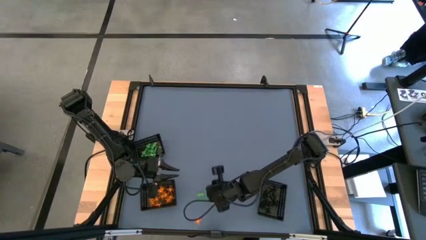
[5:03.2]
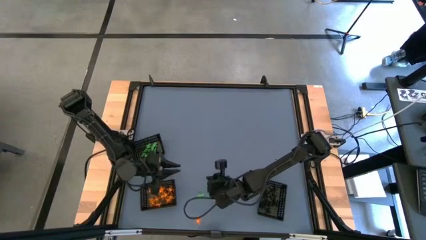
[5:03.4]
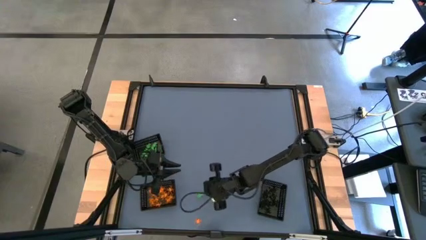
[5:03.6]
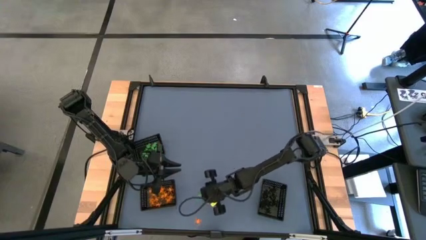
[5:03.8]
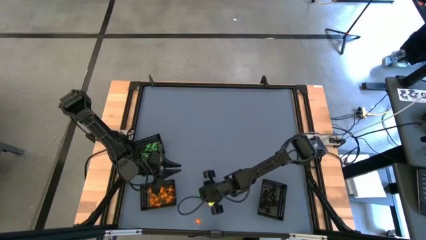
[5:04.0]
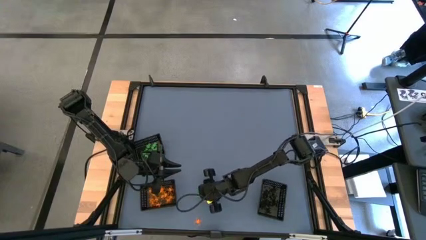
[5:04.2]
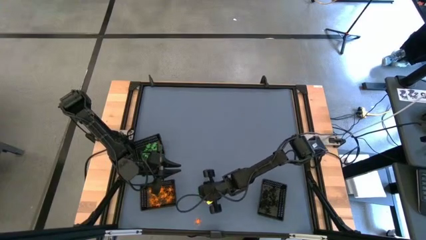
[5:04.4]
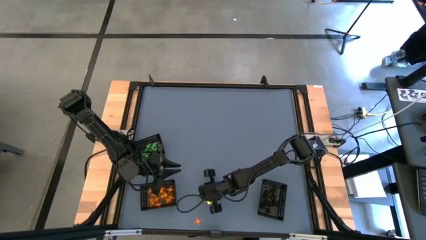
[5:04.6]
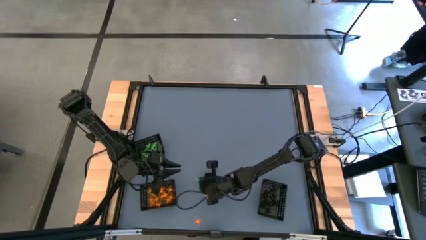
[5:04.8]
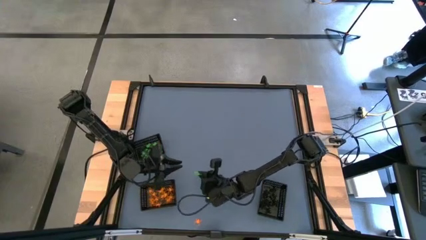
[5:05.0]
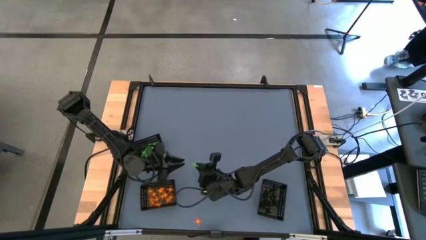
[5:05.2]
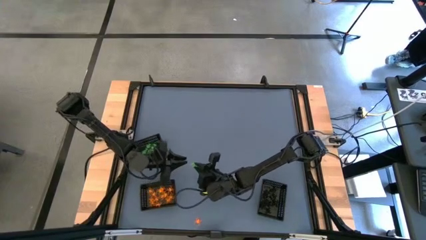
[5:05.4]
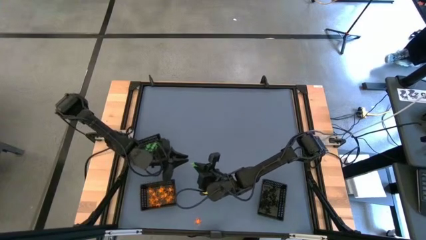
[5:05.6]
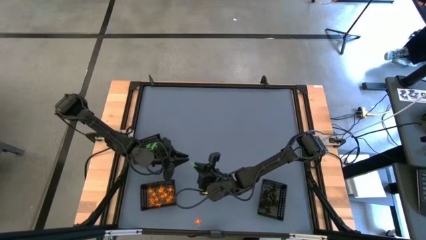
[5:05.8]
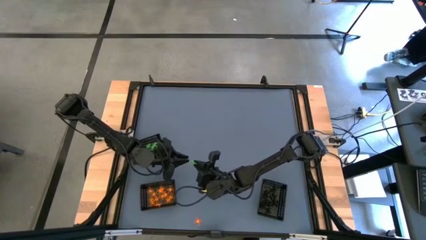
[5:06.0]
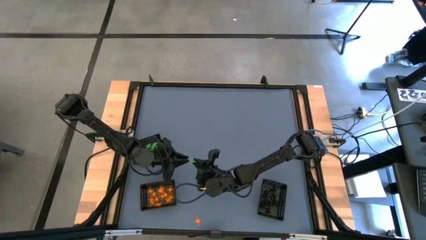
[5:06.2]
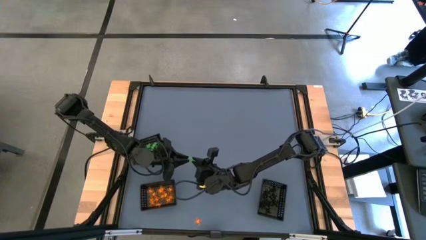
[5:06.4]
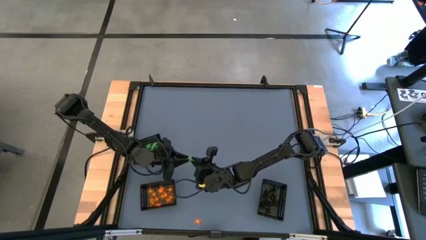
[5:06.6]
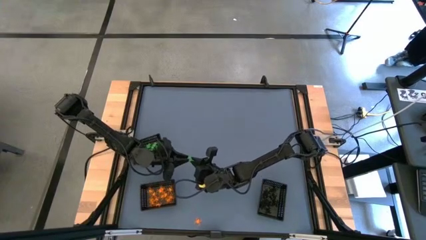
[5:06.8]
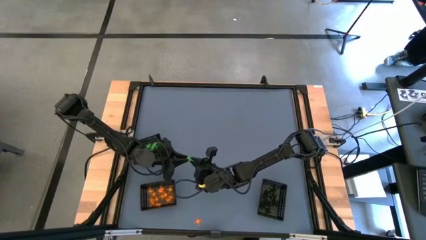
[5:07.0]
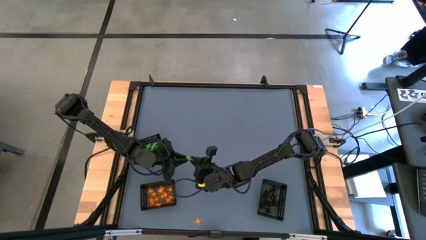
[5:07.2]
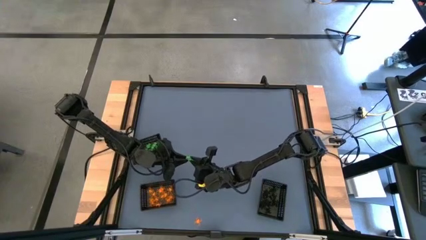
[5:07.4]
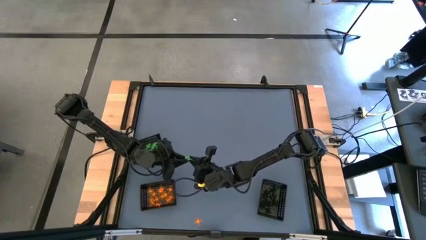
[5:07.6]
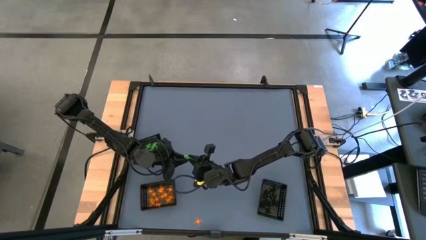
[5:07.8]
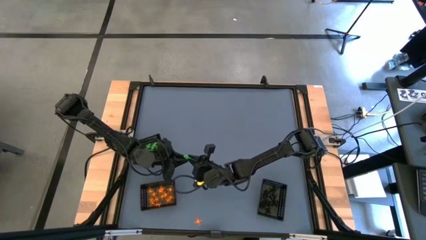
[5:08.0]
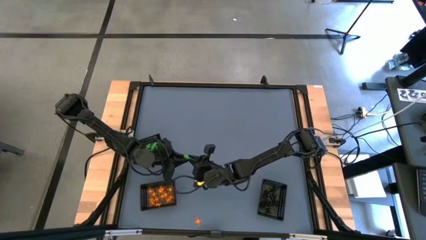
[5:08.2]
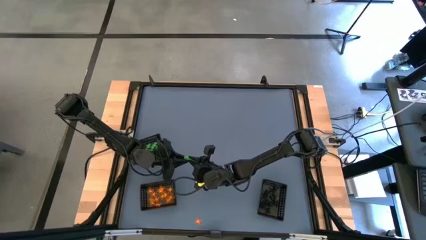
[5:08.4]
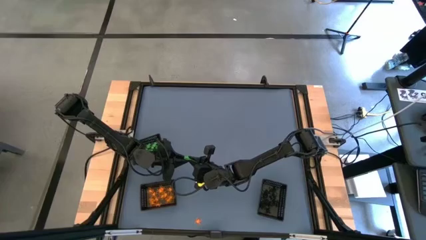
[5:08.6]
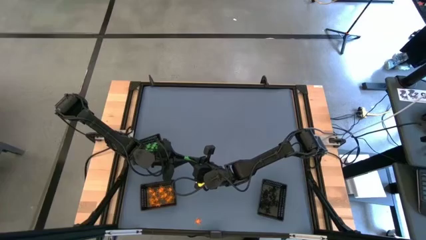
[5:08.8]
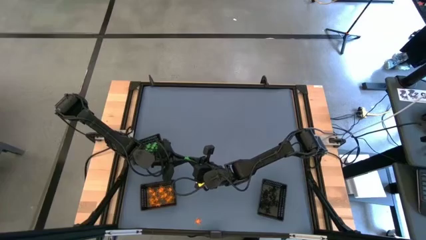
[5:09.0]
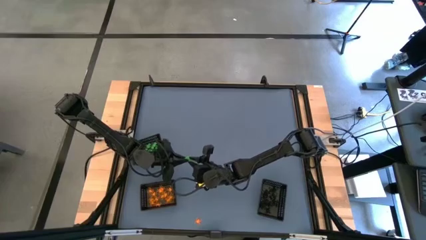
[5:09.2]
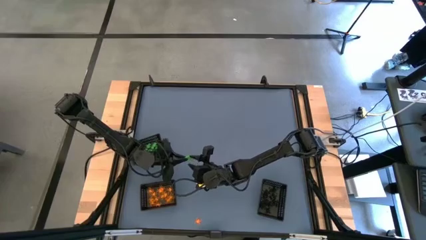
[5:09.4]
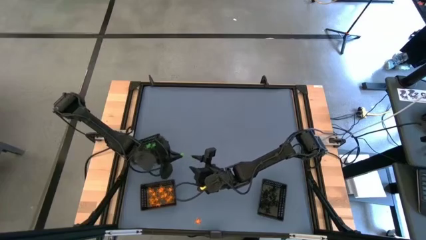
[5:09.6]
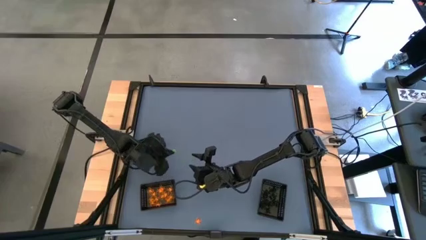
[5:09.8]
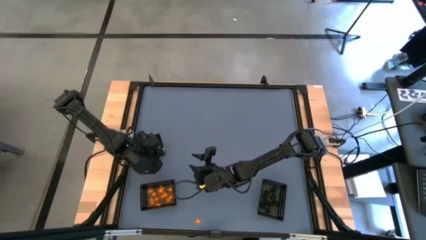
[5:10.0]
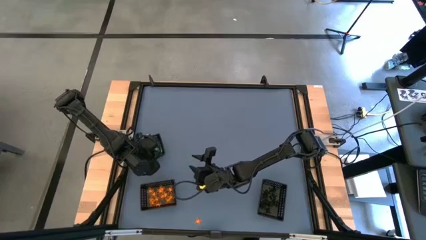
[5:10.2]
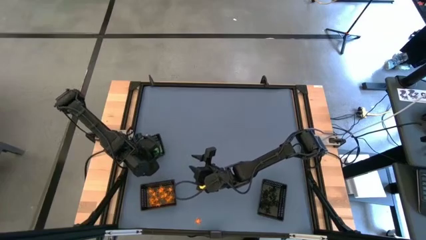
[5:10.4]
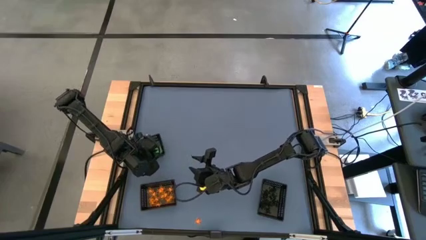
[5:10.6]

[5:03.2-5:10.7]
Task: Sort Halloween decoration
Put the green skeleton toy into the top black bin

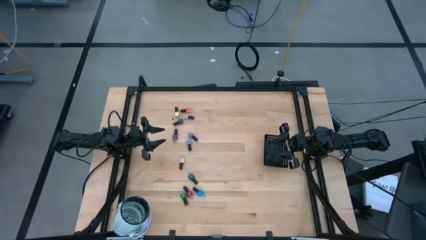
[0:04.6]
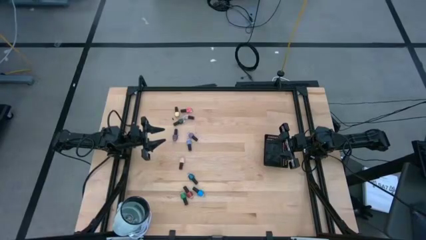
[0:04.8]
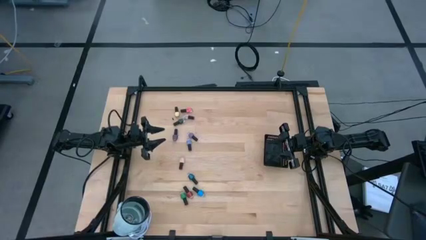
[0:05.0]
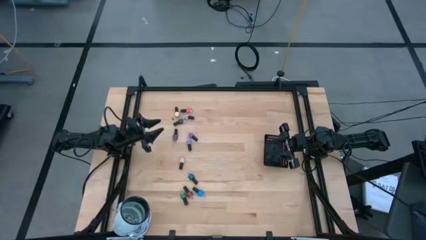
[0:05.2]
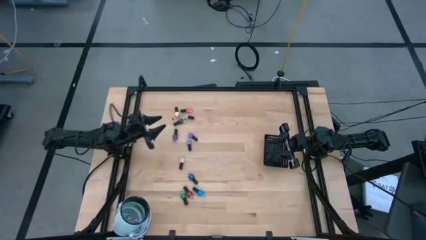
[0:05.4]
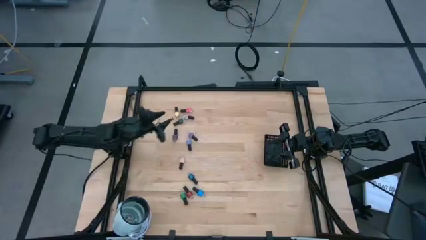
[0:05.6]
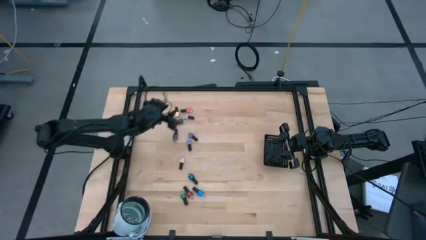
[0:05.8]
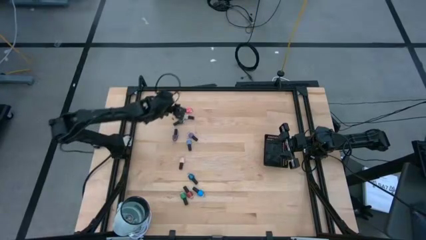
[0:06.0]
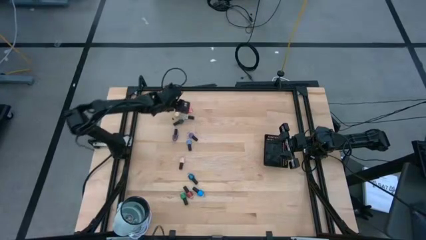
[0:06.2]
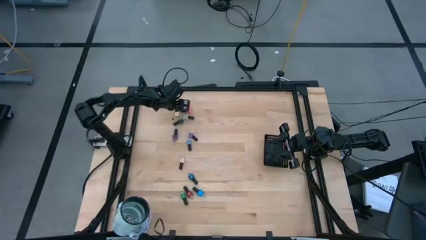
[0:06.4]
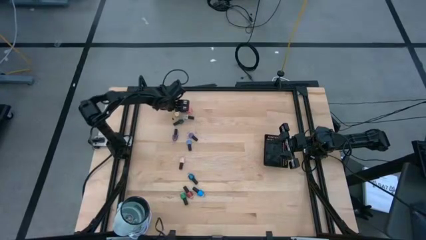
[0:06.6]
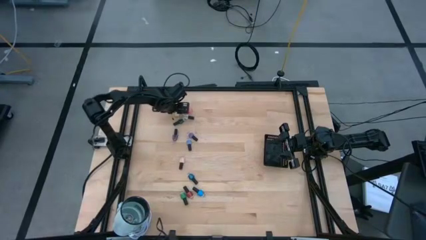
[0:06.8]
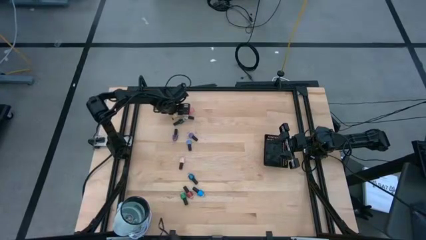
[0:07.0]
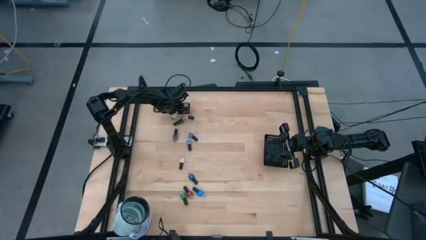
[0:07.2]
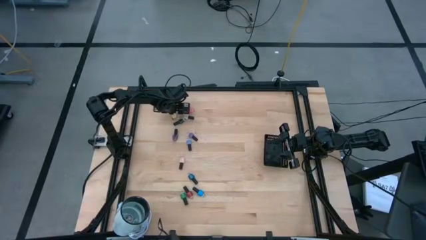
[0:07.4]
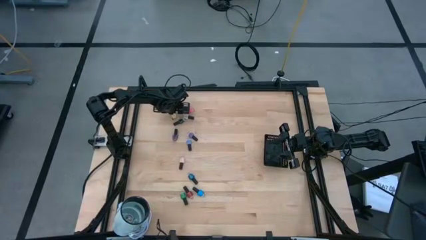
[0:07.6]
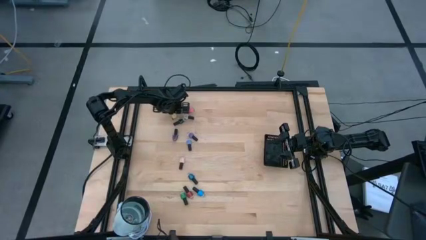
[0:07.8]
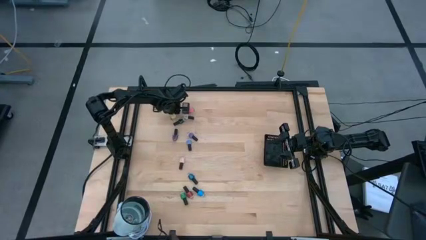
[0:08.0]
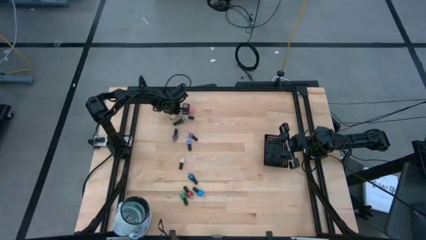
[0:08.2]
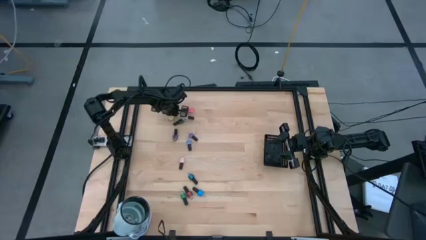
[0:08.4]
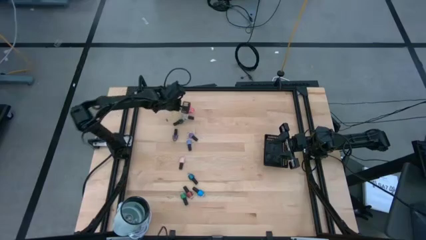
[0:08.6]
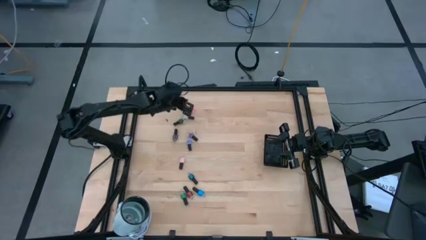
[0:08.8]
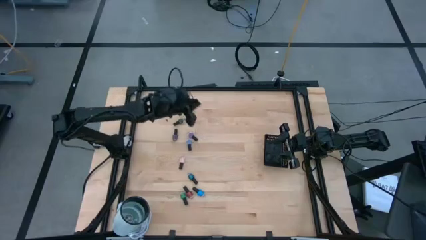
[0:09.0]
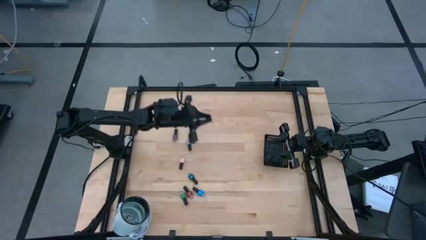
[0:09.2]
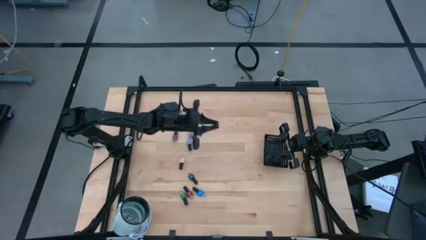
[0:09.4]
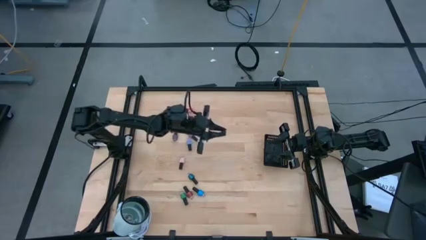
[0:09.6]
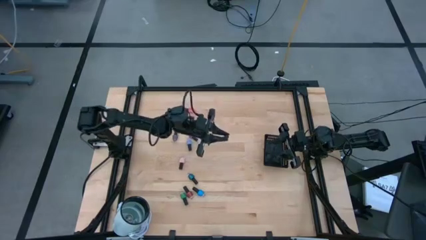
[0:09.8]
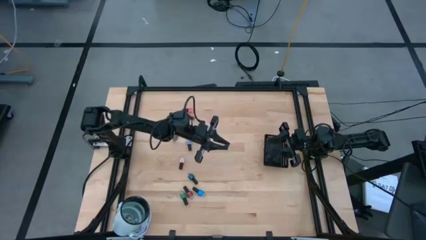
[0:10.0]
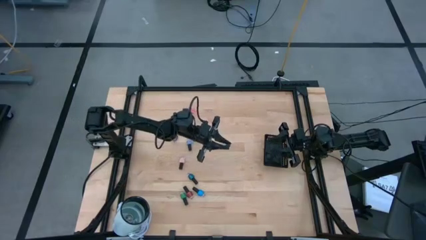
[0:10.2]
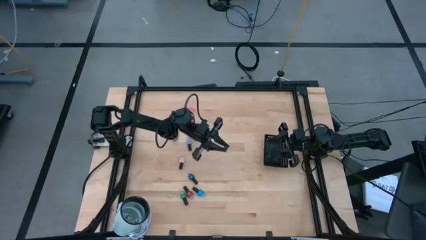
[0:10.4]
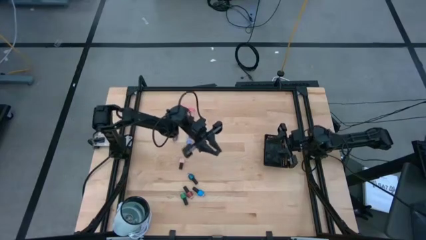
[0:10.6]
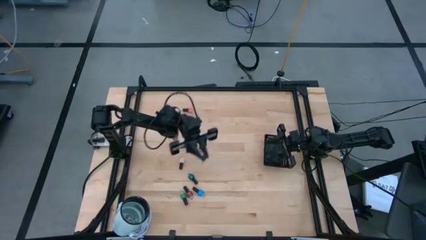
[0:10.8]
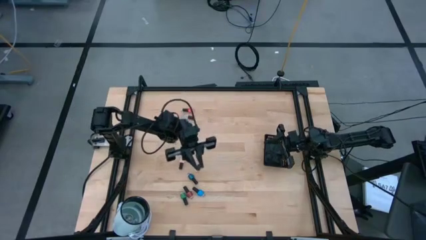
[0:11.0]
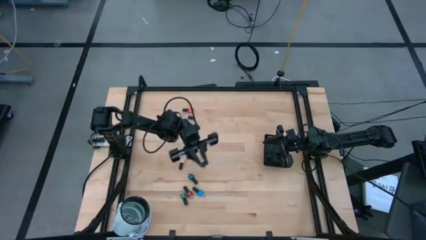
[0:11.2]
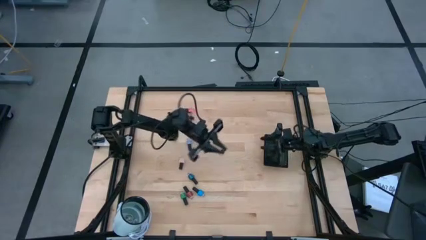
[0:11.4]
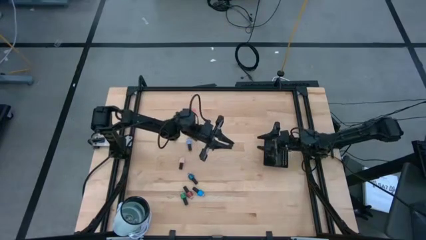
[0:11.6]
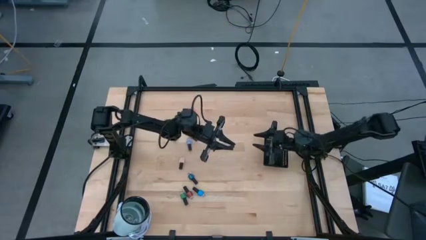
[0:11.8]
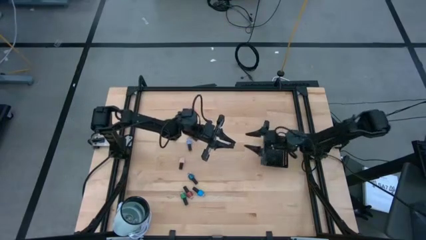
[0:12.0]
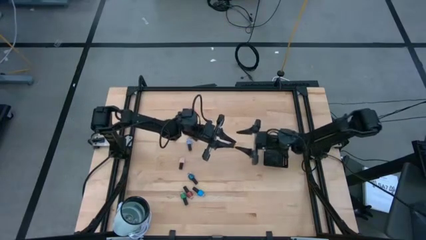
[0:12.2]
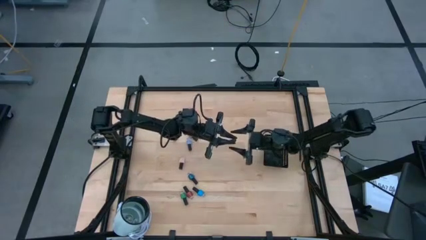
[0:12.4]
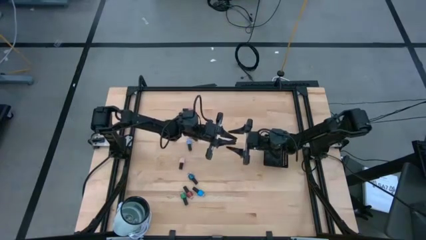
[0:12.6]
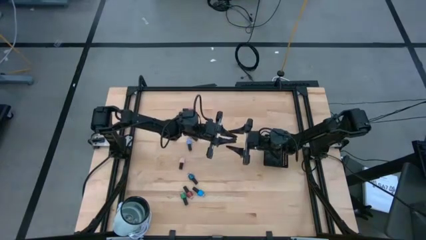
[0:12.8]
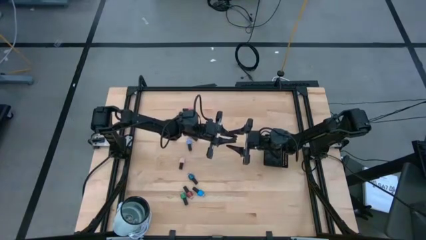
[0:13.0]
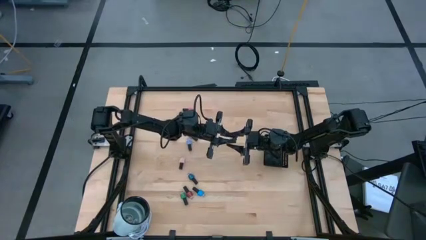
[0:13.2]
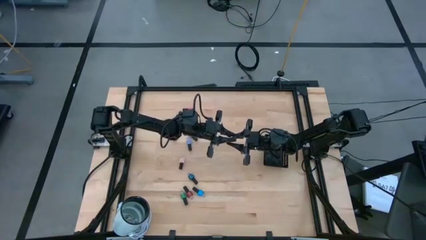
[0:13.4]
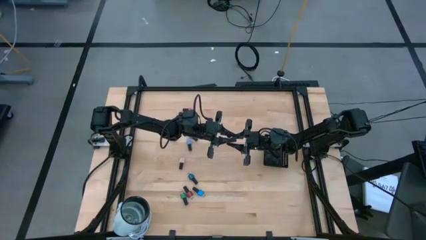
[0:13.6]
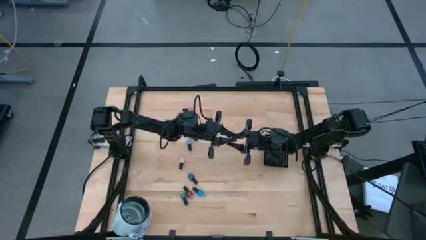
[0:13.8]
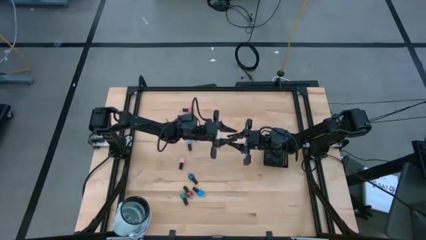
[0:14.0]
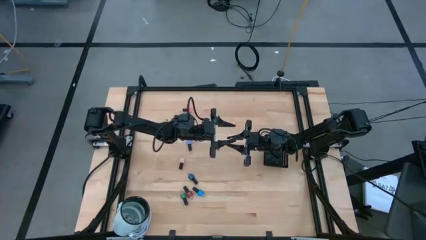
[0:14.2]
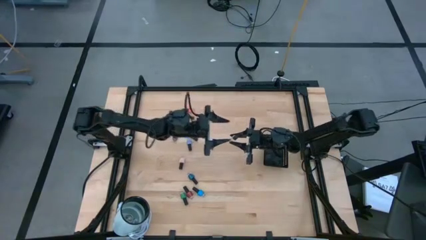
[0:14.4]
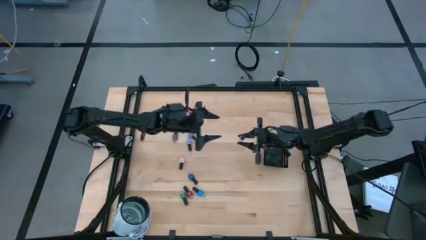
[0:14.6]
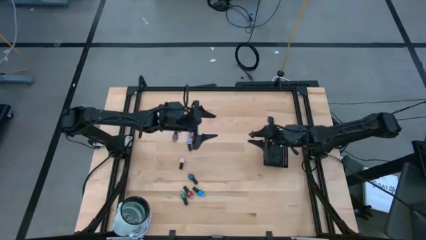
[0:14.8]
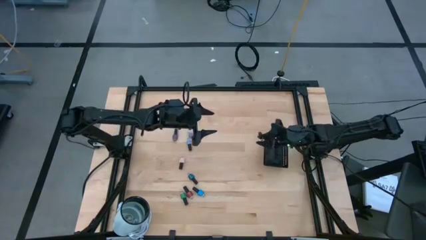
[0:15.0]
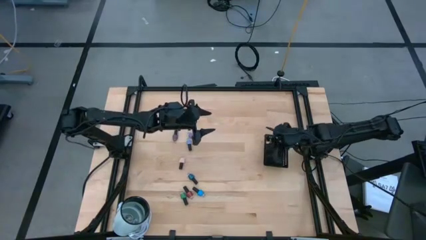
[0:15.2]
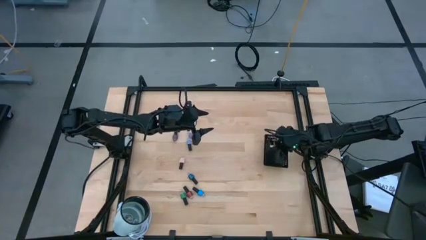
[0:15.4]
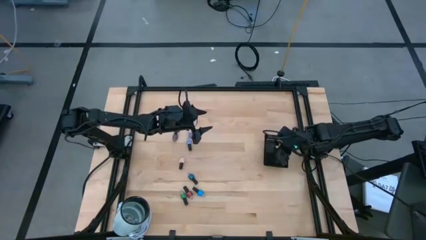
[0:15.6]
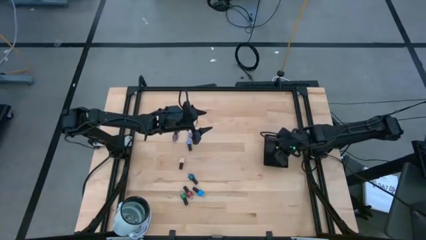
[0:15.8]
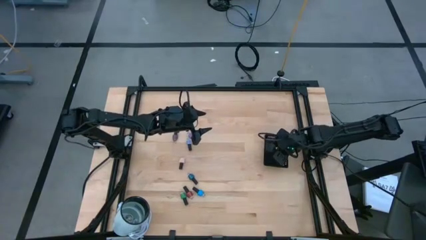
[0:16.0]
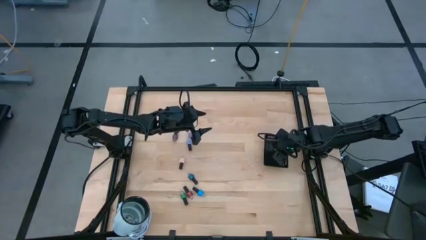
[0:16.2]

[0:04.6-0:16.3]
Task: Pick & Place Nail Polish
Put the light yellow nail polish into the black basket
